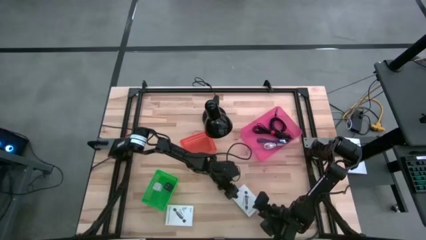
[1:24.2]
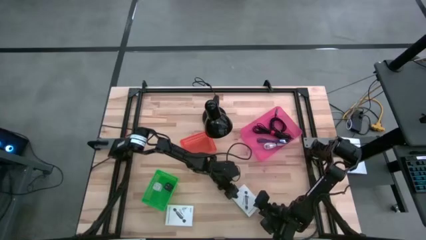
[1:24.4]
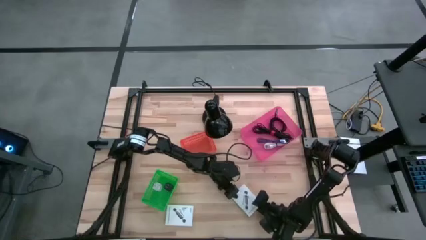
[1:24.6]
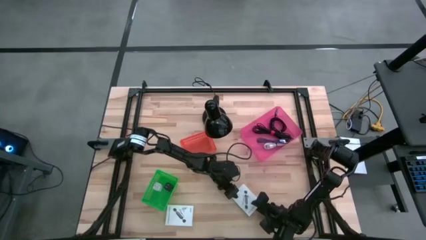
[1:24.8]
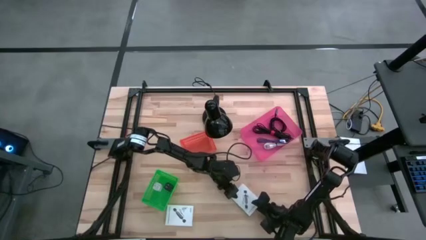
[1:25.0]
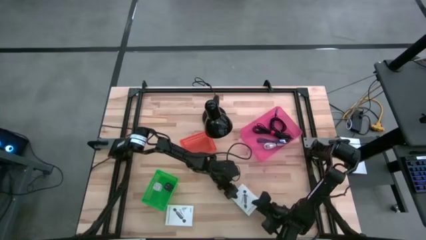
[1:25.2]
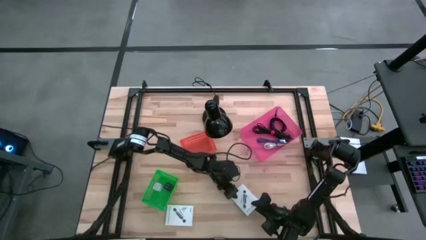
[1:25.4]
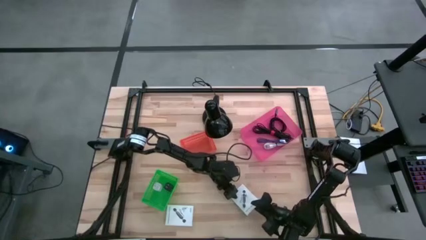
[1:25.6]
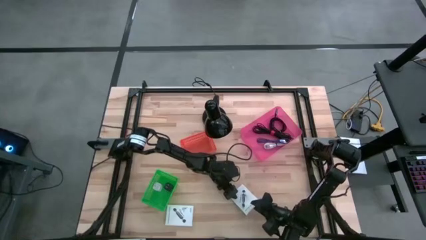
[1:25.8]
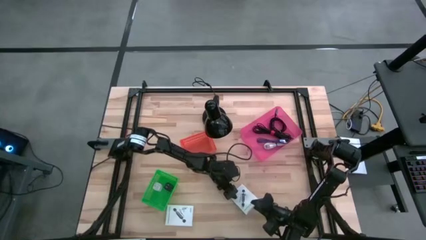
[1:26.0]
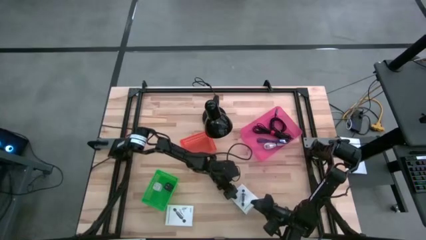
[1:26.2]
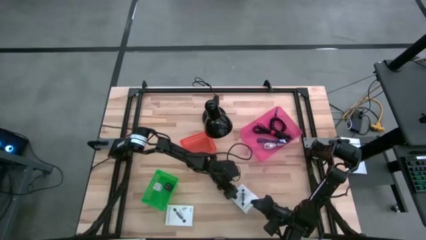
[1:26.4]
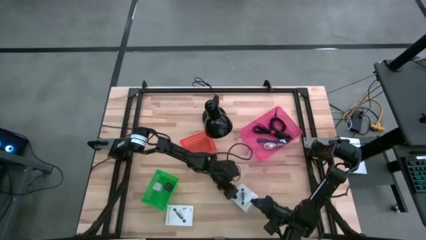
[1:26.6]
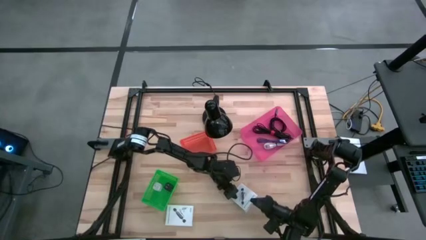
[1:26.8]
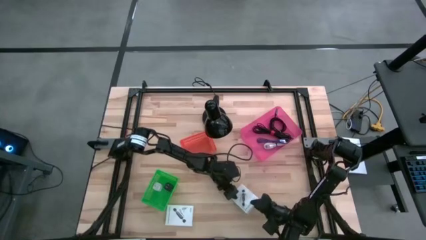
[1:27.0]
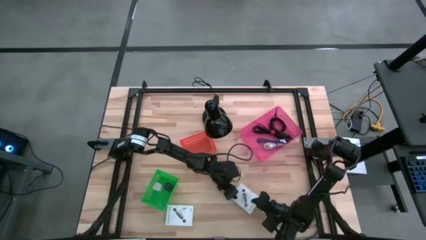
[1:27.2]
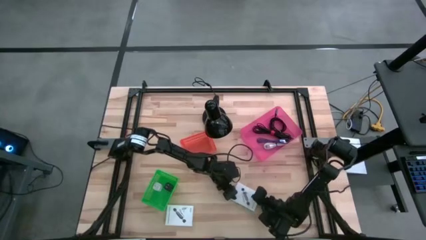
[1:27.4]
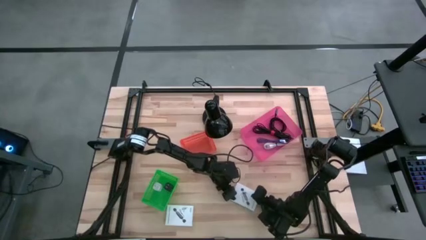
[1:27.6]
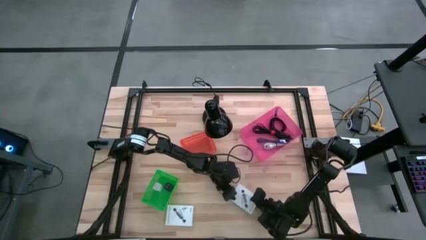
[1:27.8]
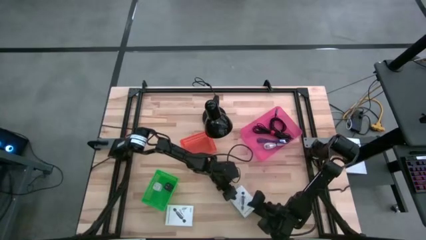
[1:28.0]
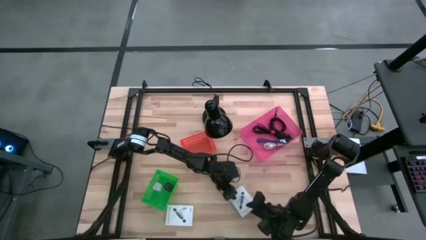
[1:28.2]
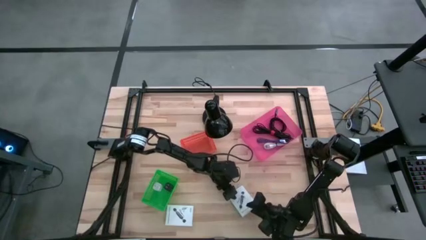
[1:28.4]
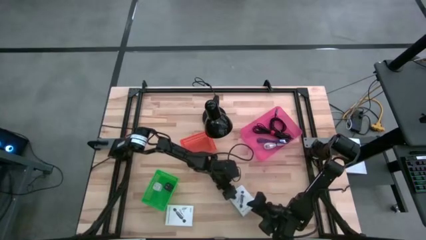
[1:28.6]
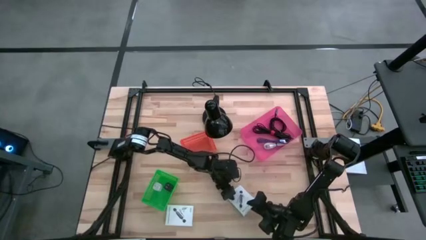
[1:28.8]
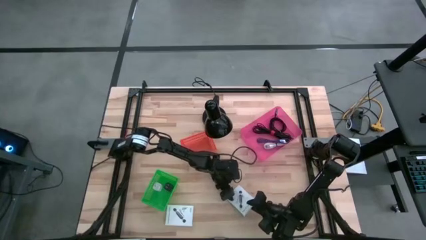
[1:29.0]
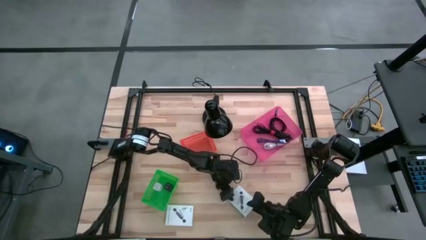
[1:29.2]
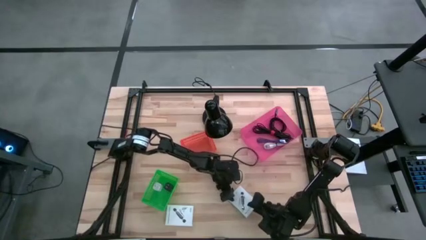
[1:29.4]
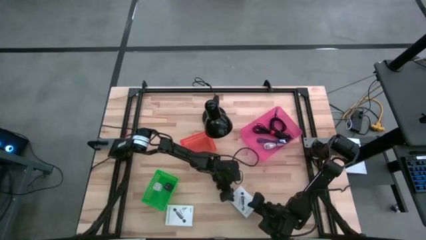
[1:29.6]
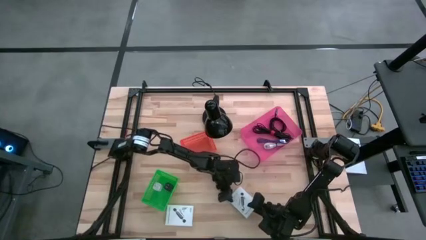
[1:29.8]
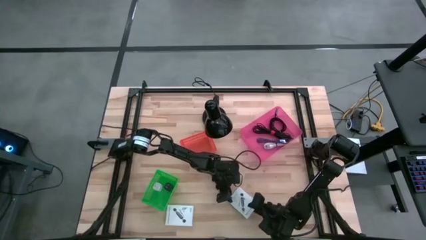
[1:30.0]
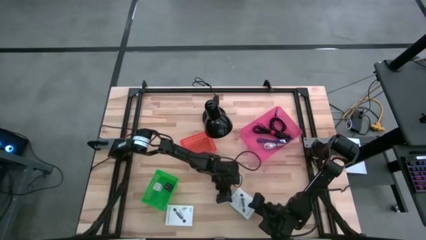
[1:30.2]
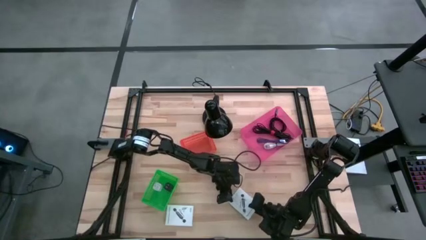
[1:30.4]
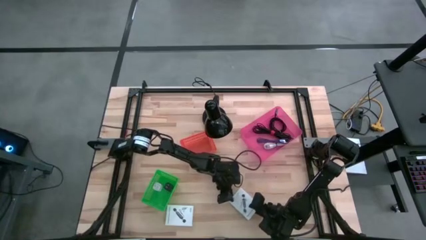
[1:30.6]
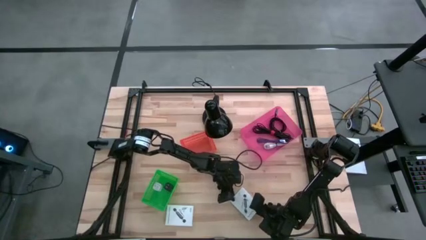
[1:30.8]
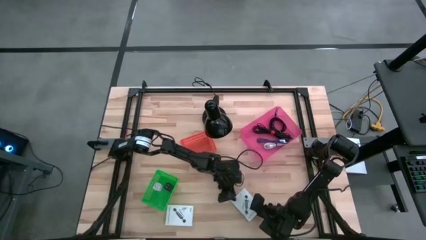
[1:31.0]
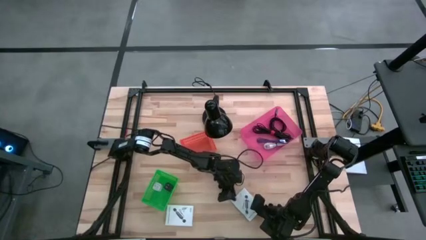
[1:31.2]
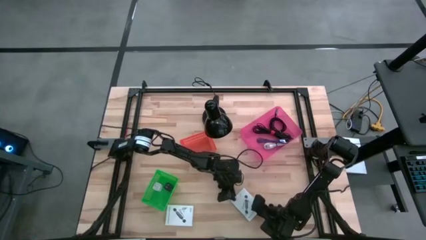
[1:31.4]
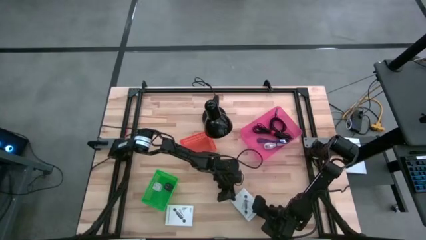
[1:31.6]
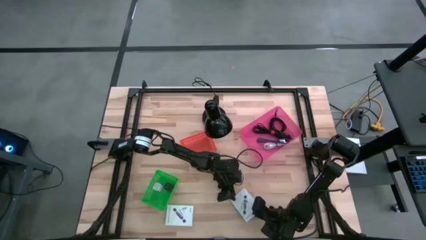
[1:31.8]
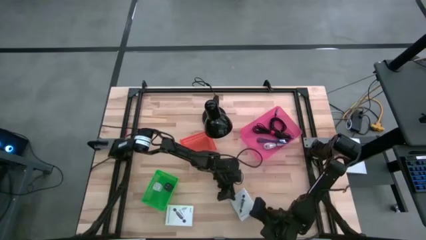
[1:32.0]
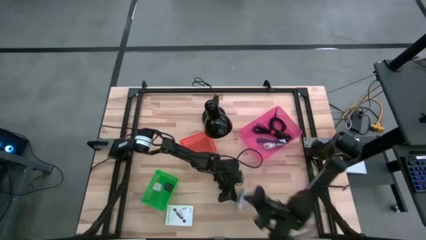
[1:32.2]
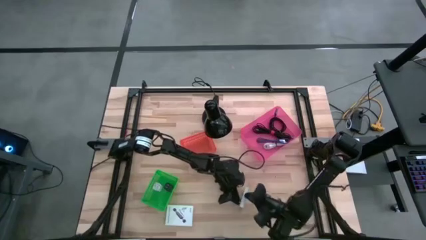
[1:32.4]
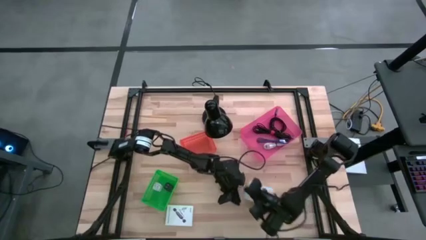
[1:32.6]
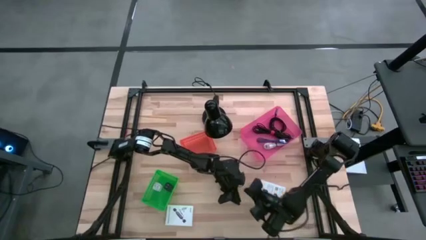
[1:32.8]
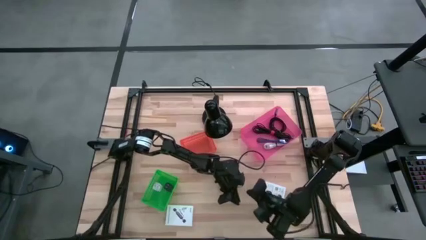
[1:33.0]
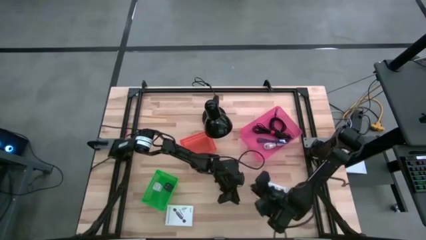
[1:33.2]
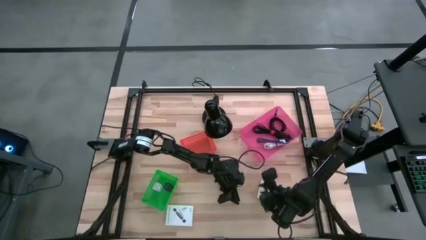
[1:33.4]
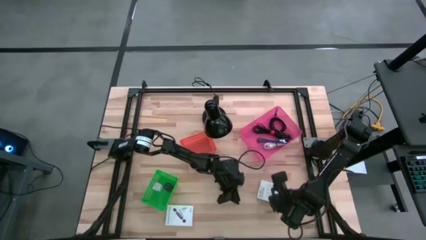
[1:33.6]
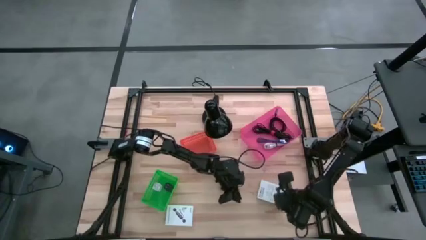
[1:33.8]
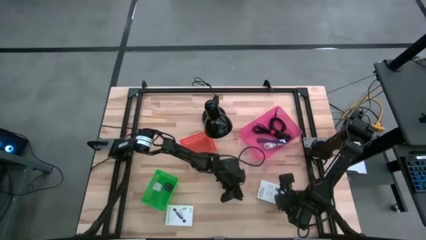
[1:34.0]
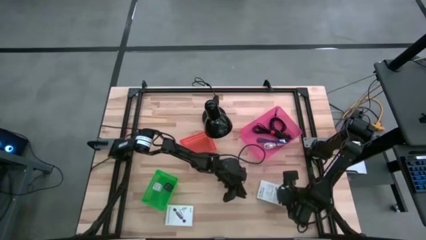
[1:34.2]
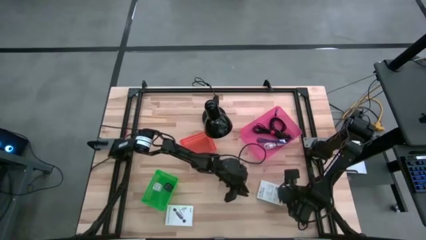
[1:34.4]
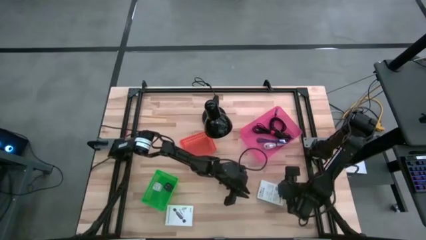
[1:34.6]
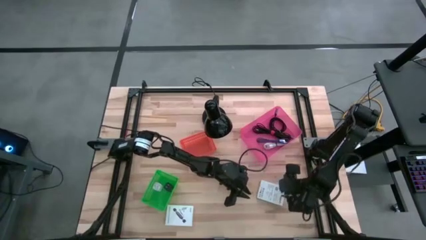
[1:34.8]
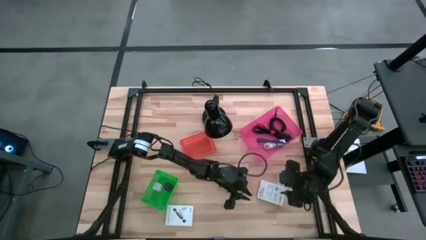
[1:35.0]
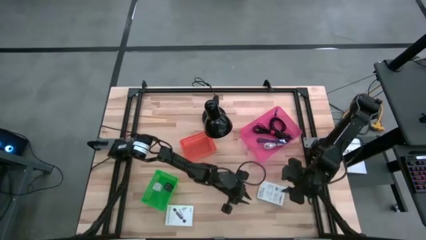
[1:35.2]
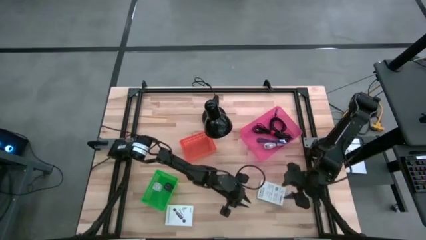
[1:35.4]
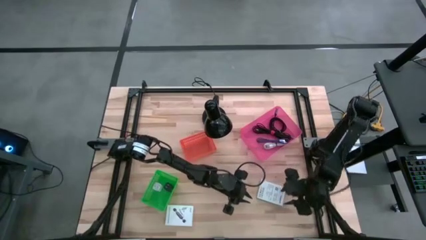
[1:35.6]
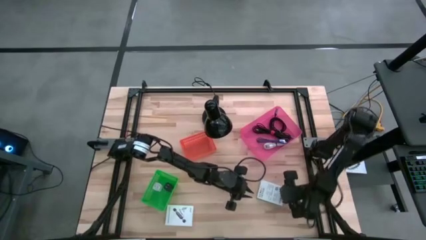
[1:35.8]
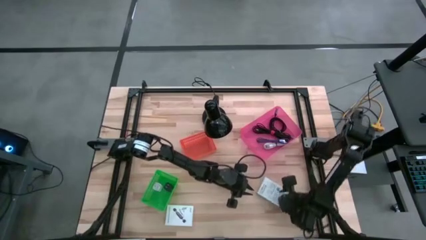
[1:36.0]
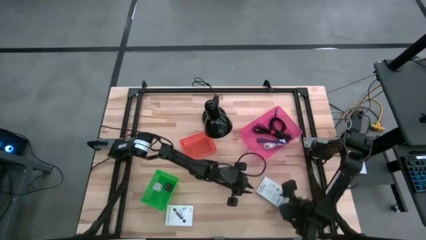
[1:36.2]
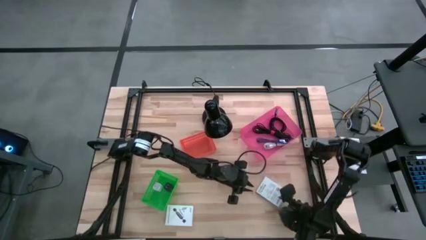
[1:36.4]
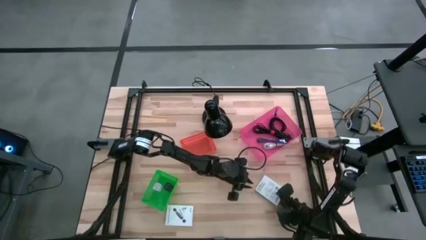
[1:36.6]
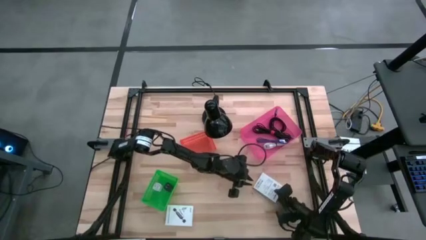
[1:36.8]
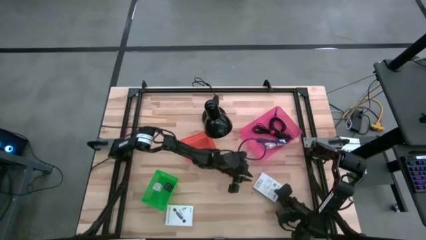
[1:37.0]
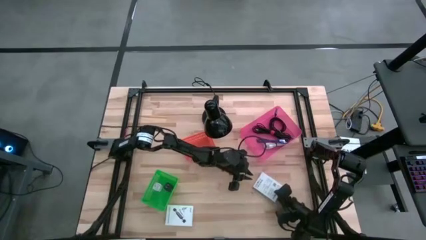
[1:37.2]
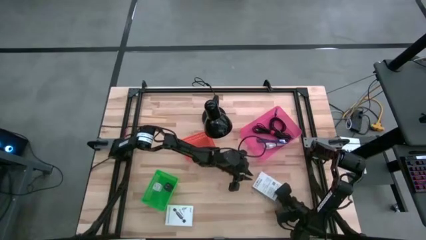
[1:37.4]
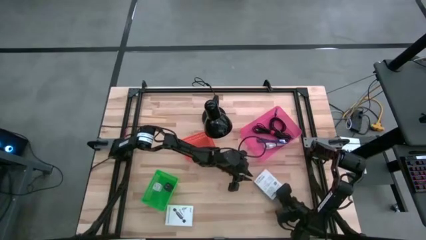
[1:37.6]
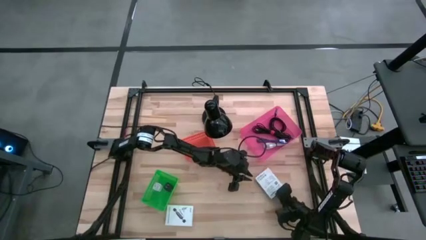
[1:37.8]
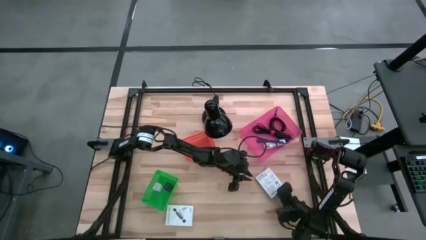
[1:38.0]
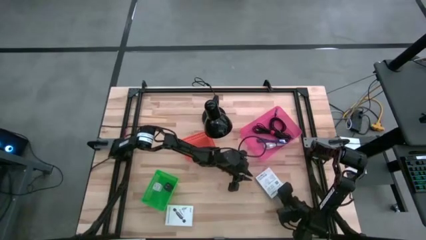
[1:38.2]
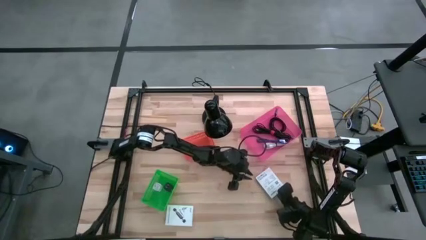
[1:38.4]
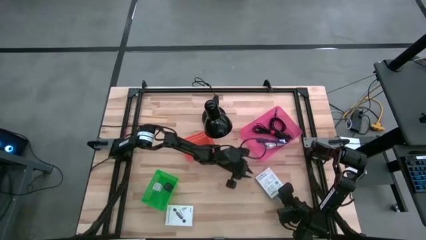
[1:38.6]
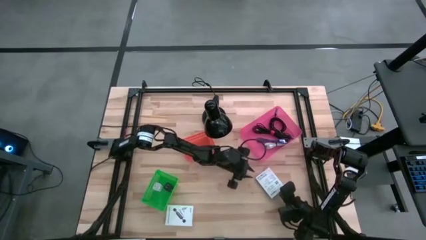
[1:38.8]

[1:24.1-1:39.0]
Task: Pick and place items into bin
Put the right white card reader box into the orange bin

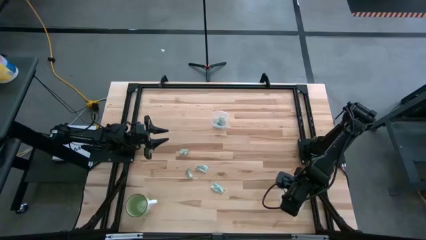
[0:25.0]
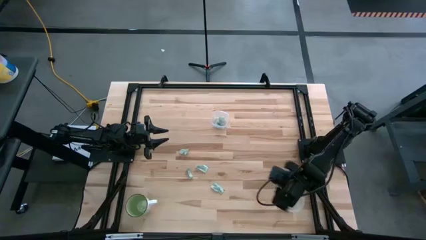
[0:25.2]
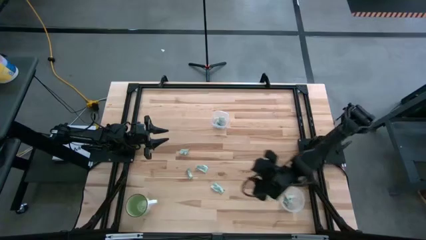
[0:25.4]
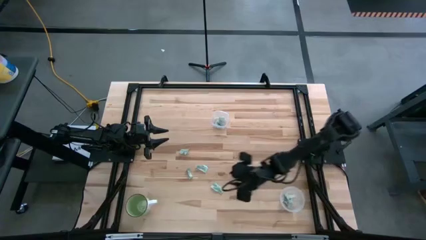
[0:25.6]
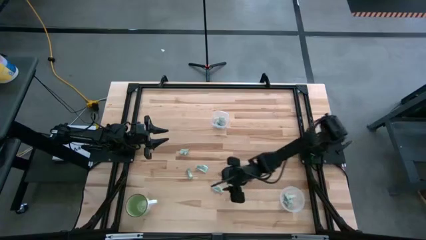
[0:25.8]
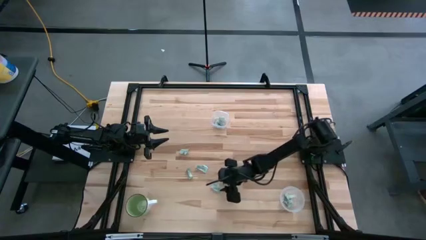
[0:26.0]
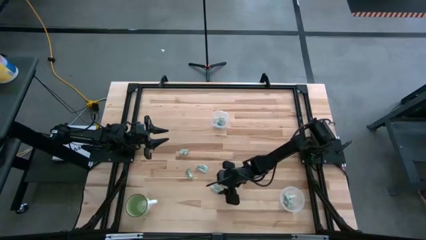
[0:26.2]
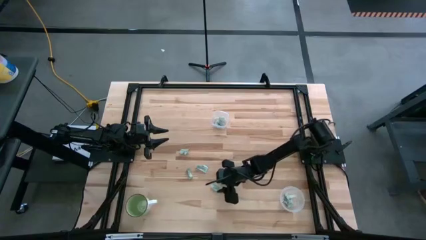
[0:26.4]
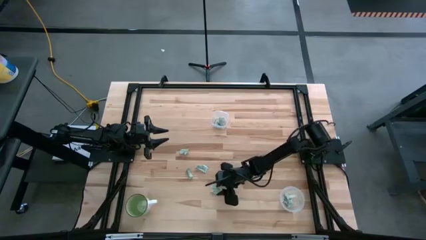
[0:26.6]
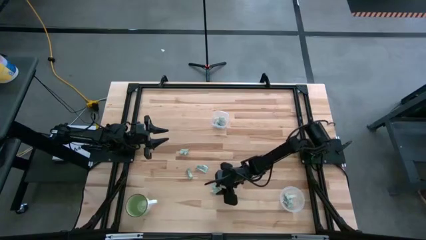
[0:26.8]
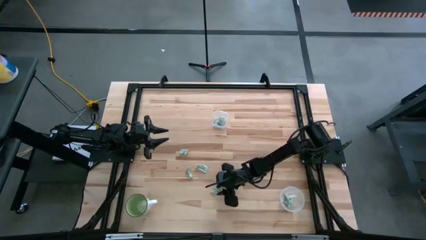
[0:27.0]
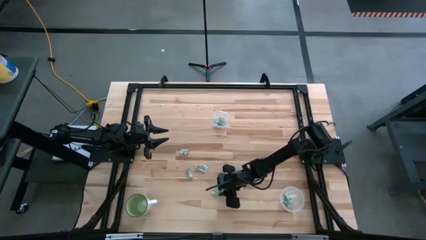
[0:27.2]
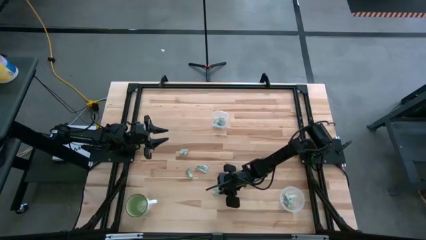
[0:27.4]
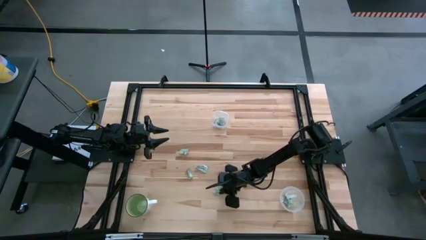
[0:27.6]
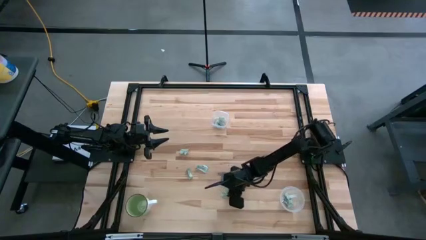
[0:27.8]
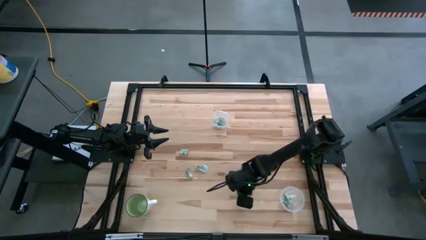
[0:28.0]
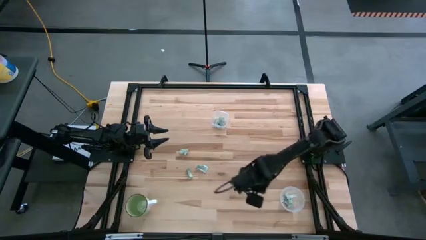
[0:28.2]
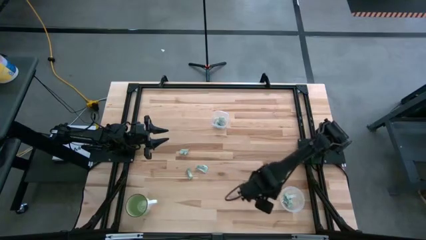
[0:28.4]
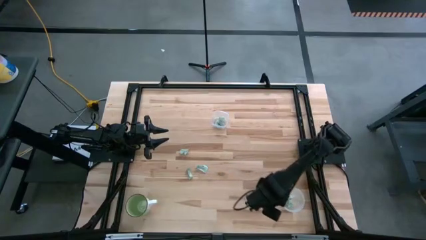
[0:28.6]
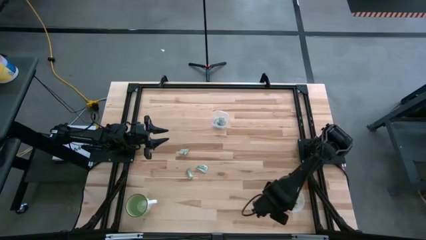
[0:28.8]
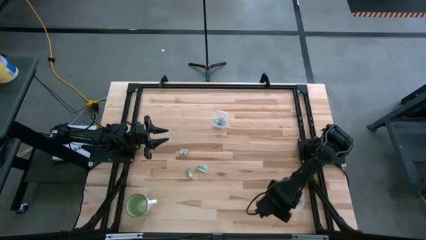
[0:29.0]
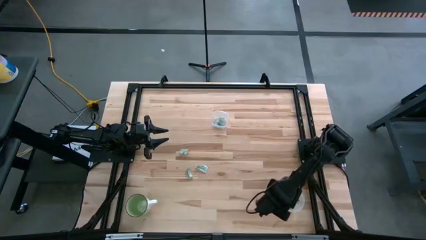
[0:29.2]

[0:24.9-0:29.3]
Task: Pick and place items into bin
Put the green stevia packet into the circle transparent bin
